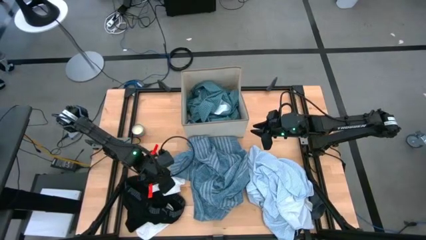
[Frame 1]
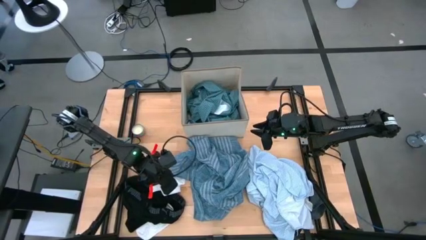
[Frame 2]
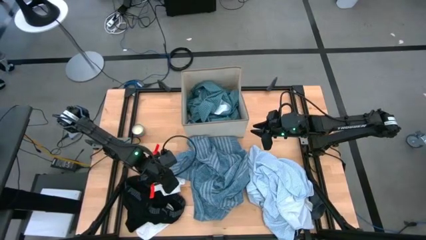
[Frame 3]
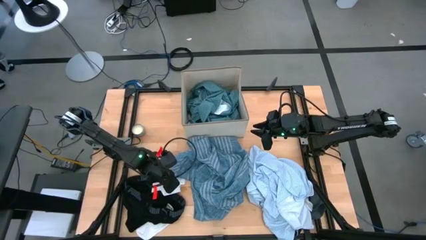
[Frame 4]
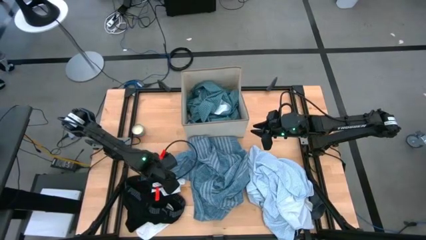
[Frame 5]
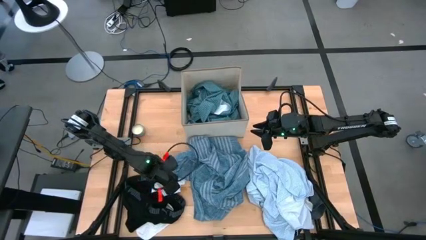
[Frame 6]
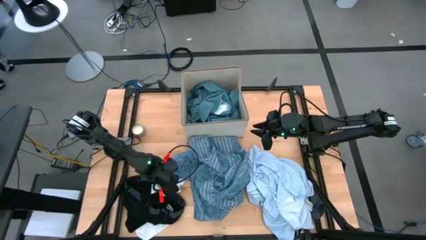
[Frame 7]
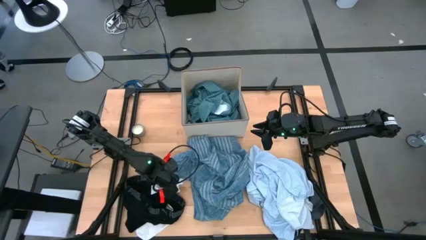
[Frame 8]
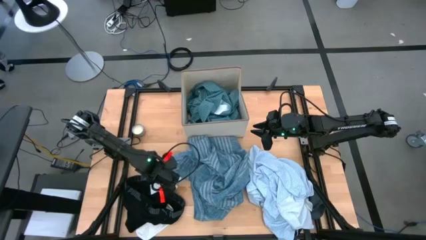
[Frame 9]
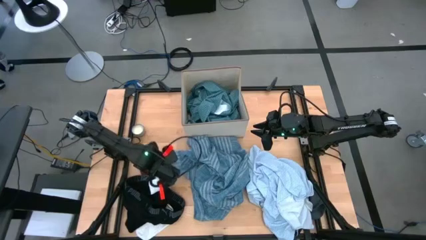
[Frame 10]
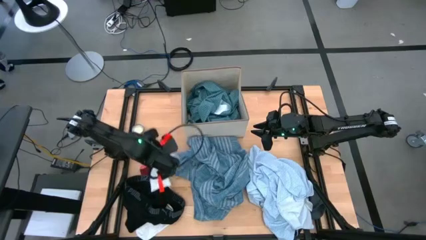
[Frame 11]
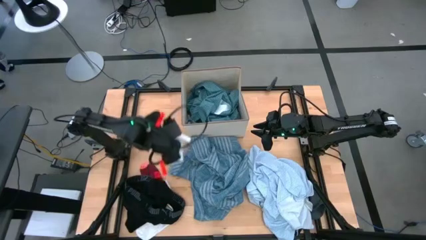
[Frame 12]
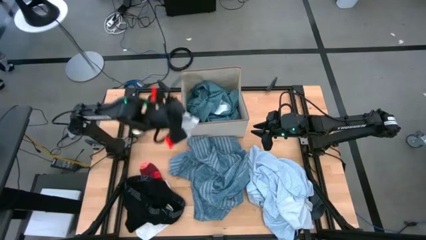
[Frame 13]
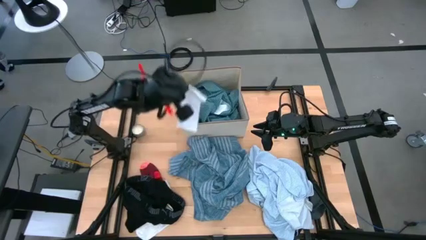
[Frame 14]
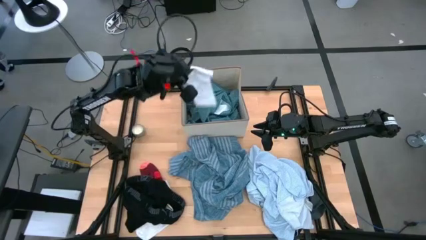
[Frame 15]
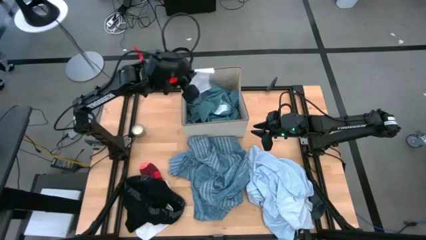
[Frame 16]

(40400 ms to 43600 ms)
Task: Sort clothes
Put the white sock into the laundry bin

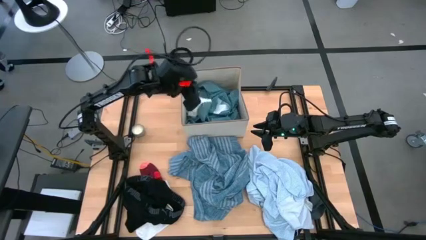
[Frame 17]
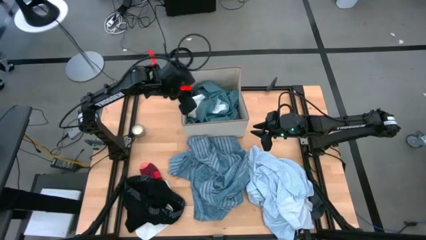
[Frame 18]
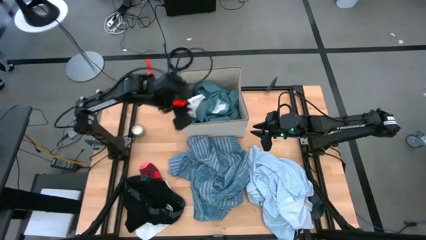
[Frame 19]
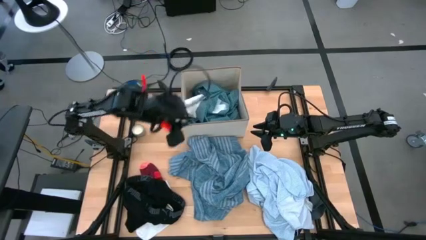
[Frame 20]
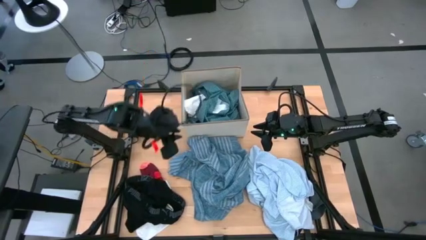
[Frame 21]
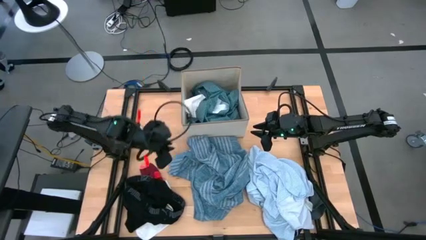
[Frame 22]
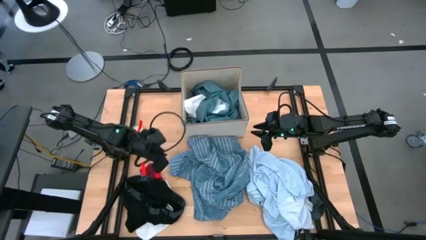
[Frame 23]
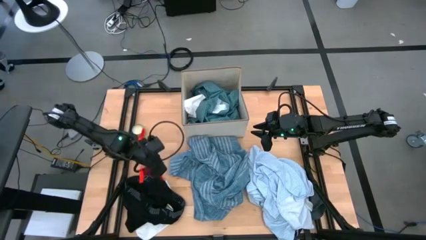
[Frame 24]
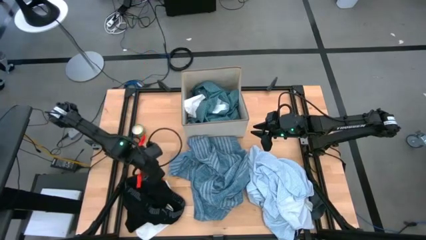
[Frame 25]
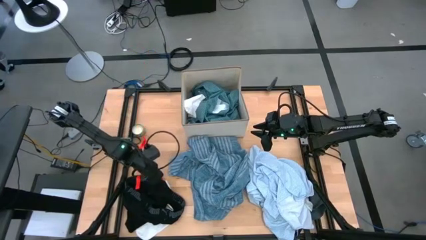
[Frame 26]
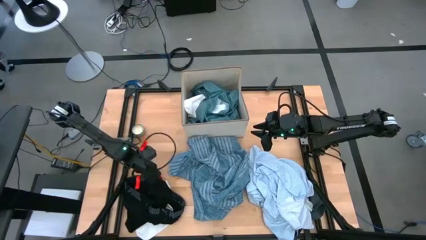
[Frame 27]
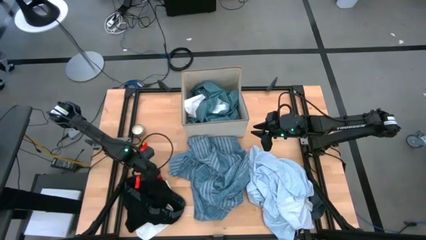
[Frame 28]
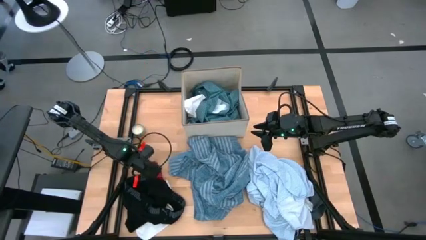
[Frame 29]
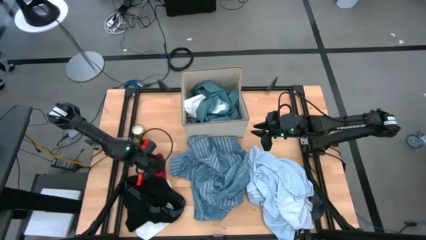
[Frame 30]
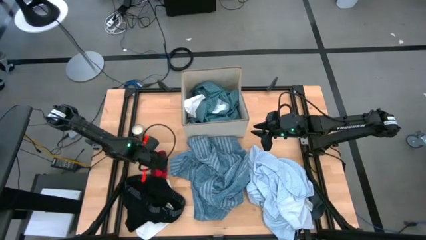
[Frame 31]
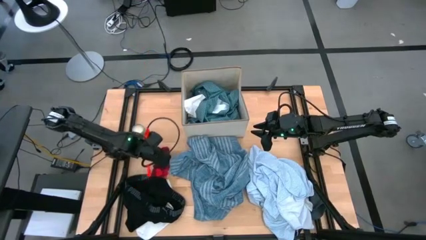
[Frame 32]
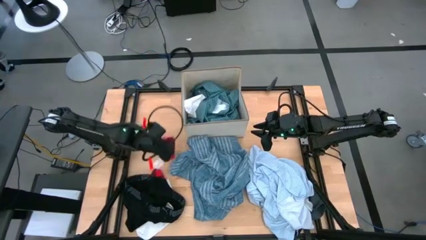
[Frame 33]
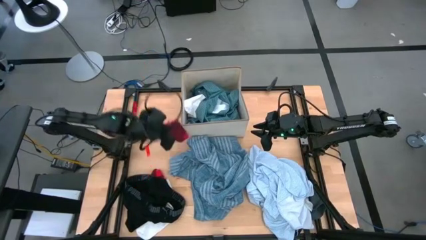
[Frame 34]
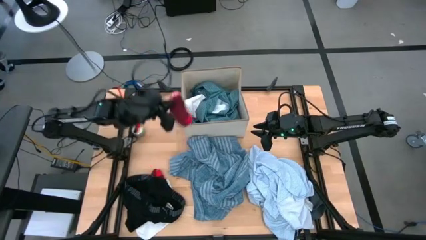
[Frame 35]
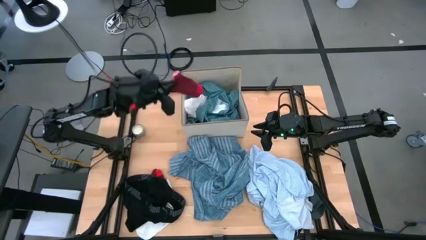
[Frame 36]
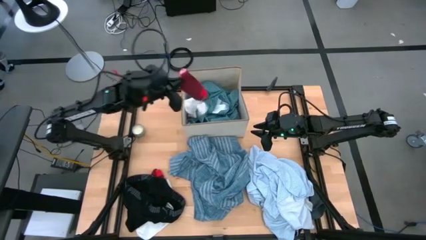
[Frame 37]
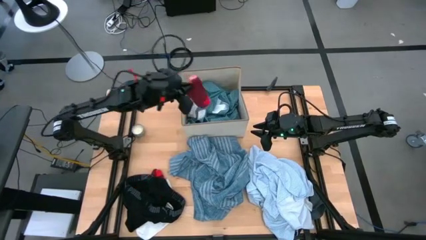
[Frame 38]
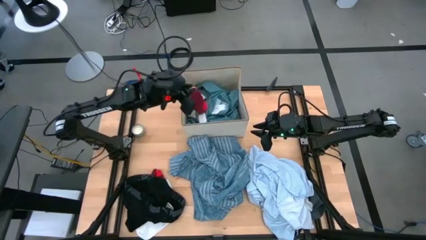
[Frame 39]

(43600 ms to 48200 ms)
Put the red sock into the laundry bin

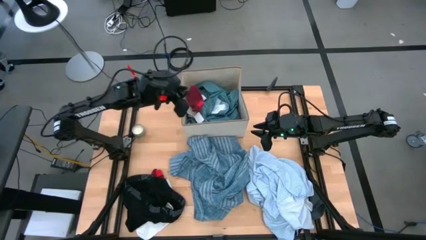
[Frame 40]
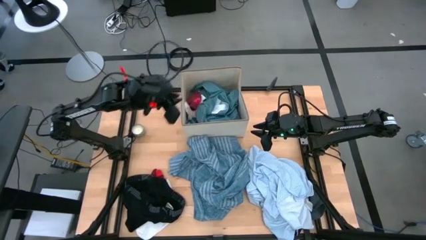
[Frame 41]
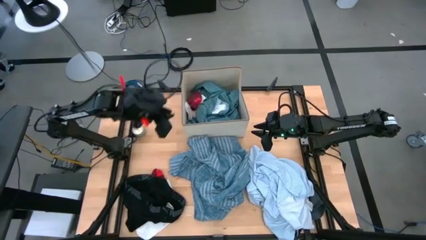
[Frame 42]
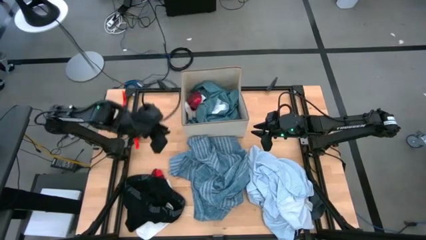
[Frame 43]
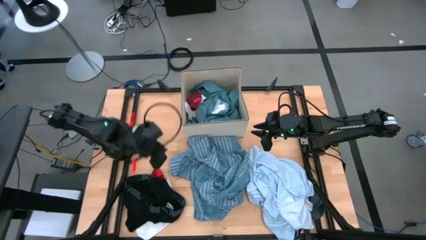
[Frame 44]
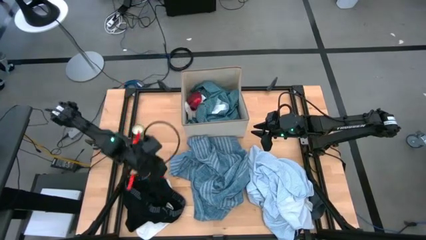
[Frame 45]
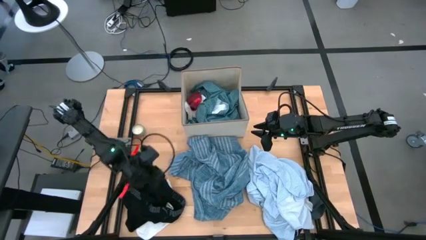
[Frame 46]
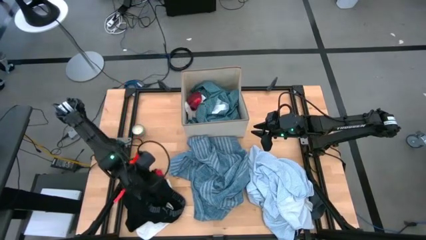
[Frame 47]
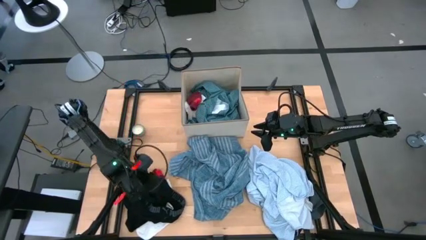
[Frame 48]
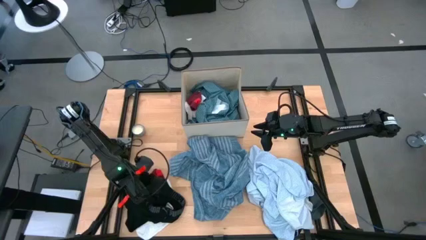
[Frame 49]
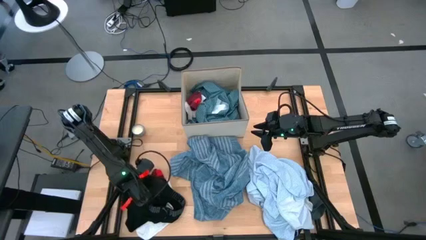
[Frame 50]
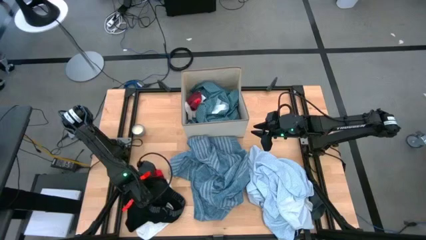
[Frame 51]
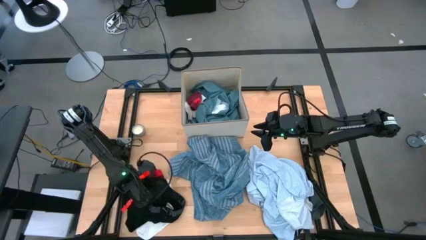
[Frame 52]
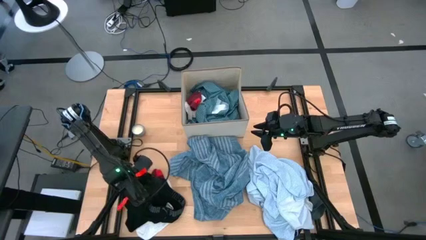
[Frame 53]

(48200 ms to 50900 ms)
Put the black boxer into the laundry bin

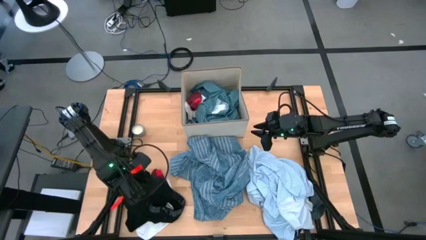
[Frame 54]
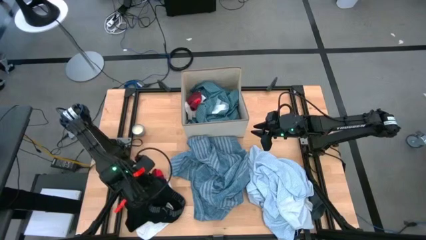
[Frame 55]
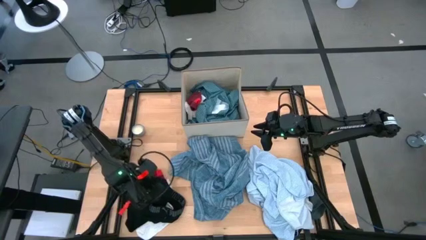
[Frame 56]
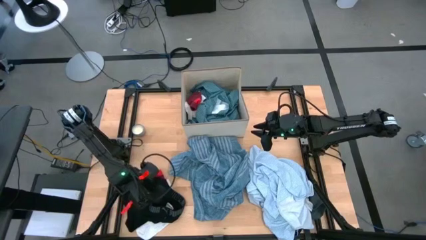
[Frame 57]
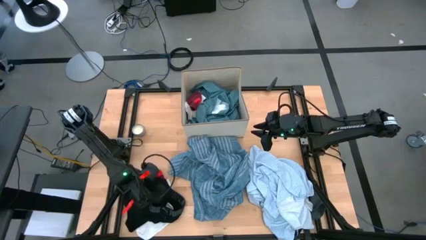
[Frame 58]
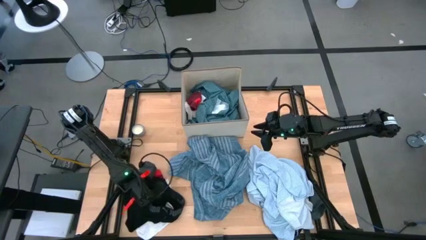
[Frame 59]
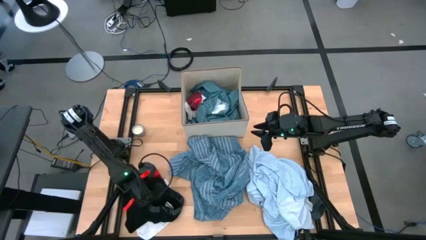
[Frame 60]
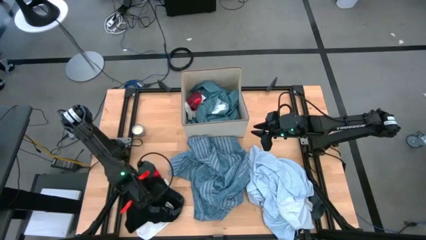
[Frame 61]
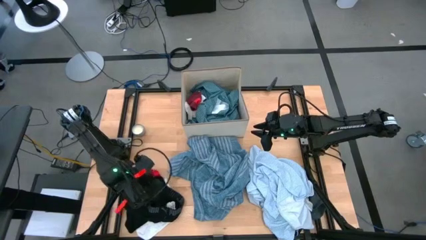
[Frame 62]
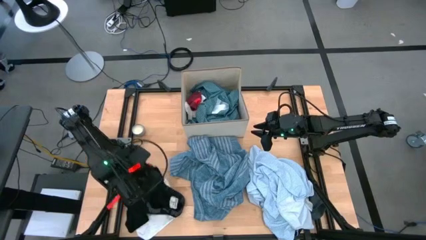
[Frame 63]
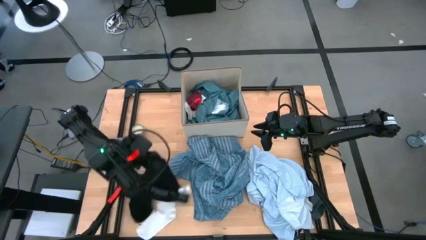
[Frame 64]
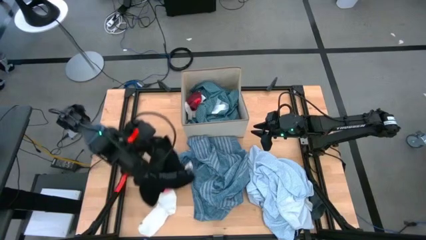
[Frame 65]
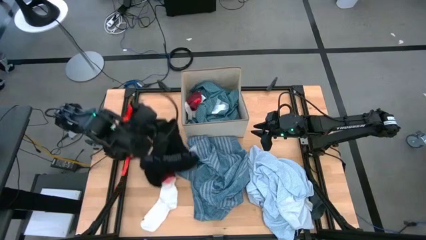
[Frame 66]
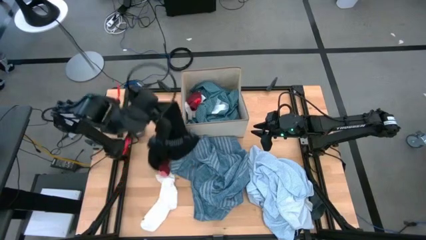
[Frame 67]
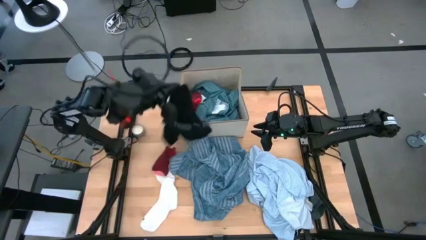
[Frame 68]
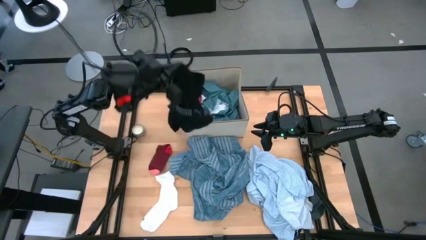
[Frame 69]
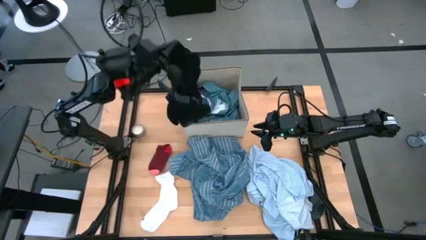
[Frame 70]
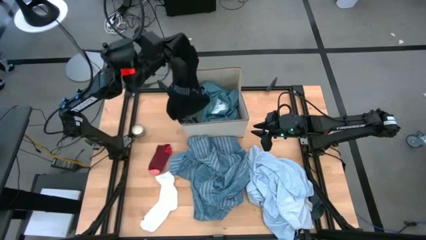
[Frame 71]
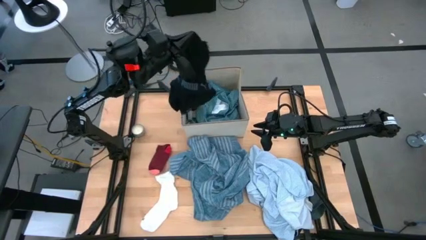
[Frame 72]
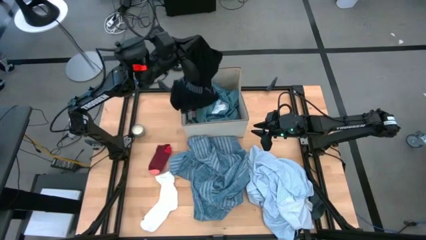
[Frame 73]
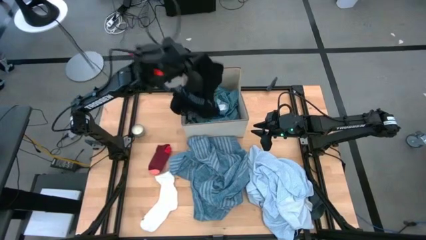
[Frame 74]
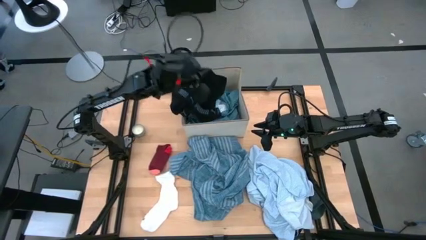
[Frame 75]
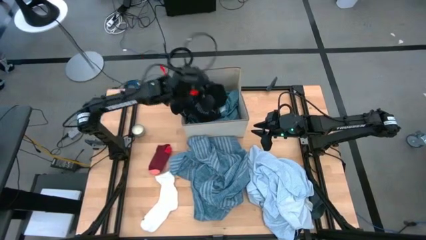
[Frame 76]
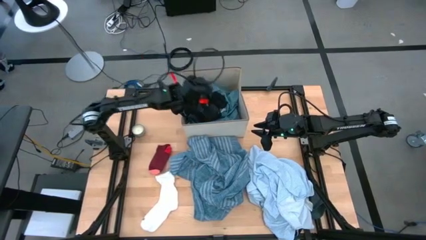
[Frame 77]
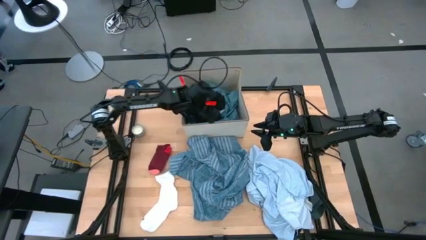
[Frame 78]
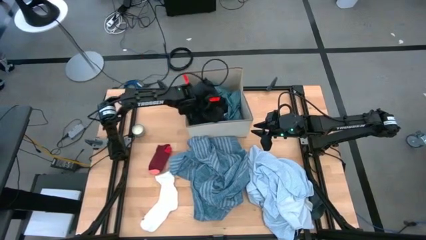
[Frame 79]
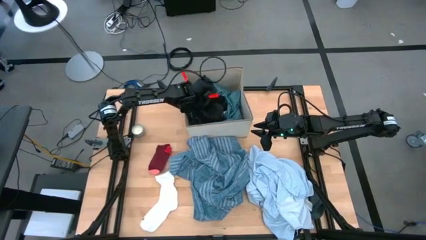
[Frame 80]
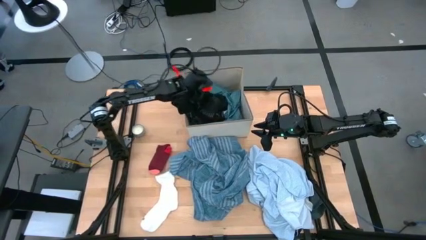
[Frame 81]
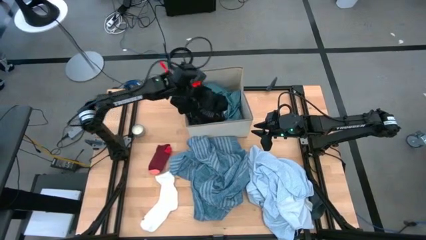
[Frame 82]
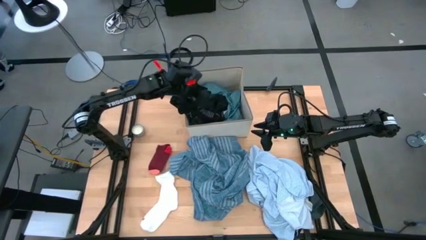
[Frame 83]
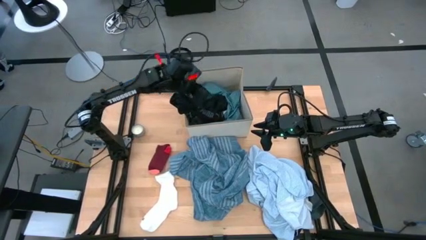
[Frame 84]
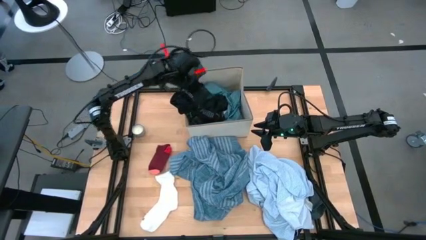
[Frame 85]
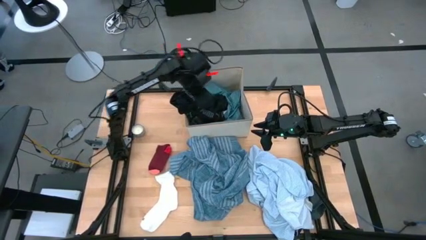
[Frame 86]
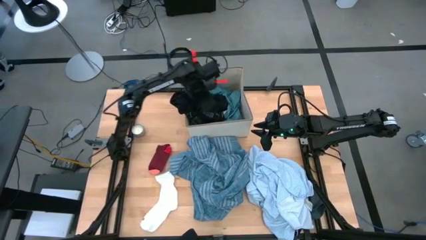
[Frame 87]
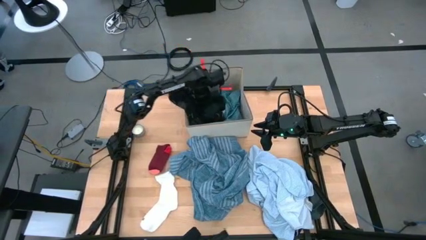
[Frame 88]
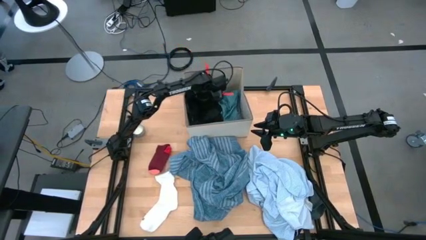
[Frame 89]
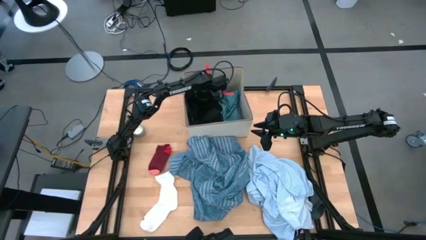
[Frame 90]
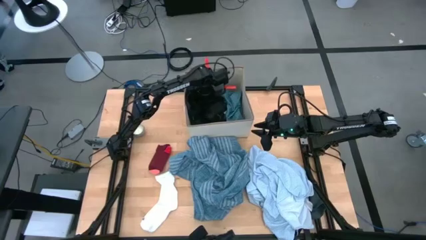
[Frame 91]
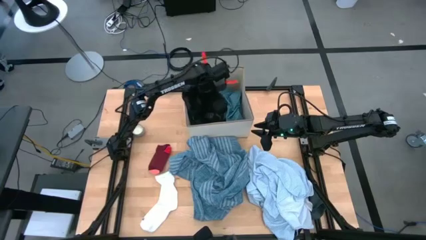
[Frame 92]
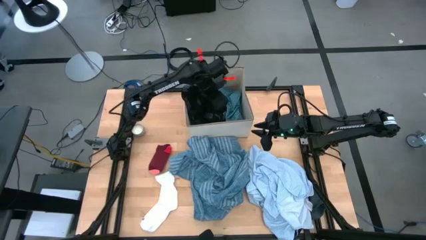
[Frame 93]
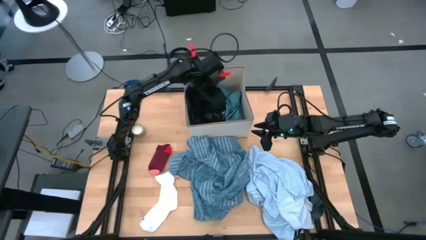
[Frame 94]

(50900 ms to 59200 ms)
Put the black boxer into the laundry bin
